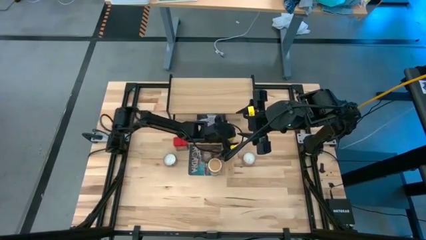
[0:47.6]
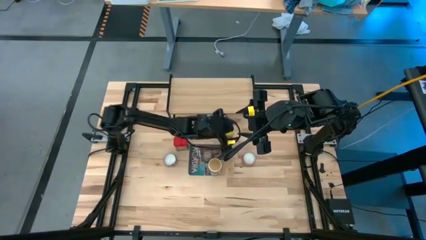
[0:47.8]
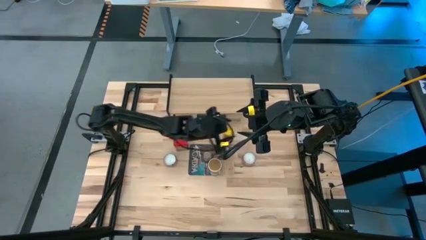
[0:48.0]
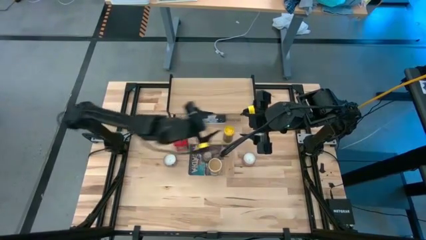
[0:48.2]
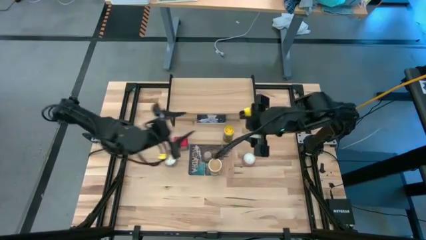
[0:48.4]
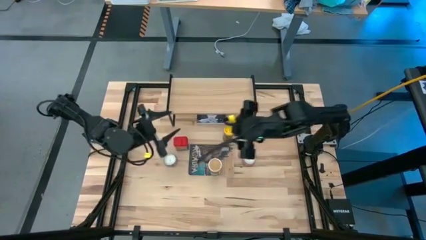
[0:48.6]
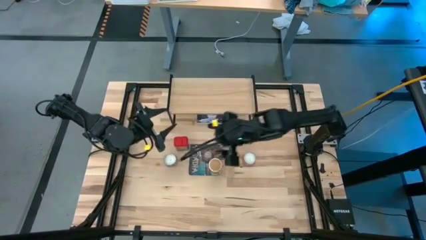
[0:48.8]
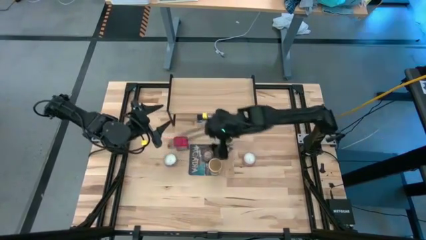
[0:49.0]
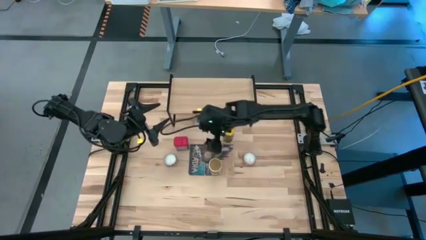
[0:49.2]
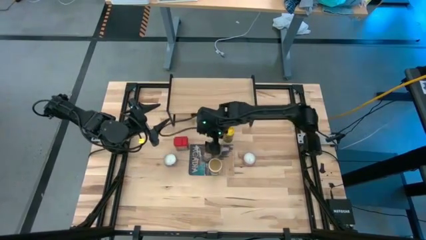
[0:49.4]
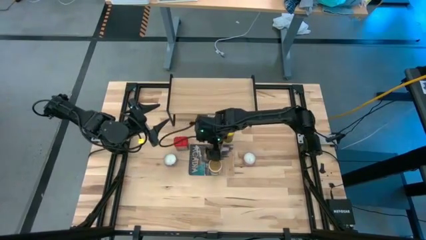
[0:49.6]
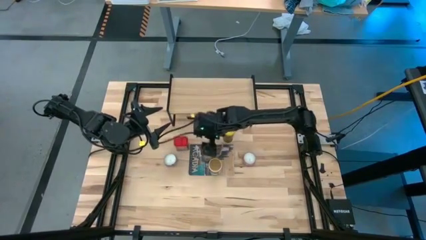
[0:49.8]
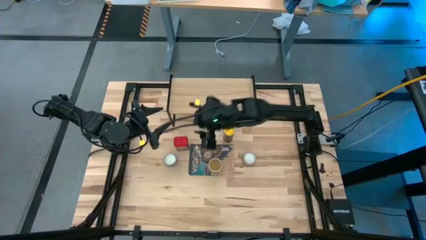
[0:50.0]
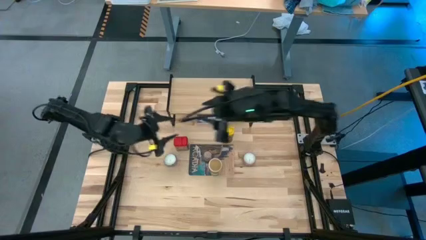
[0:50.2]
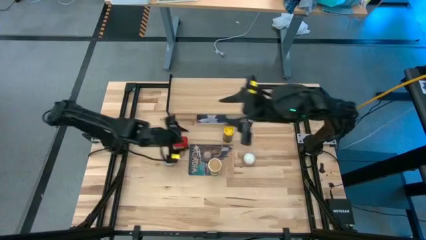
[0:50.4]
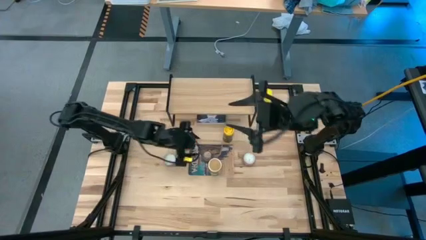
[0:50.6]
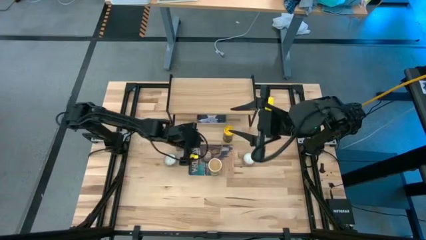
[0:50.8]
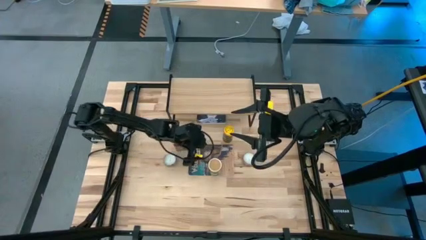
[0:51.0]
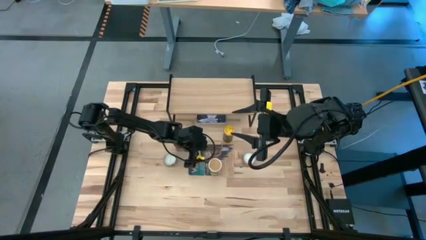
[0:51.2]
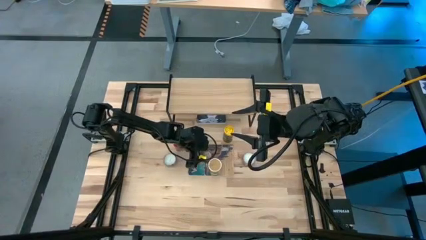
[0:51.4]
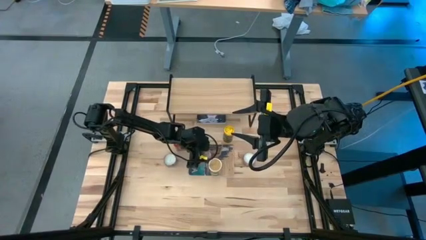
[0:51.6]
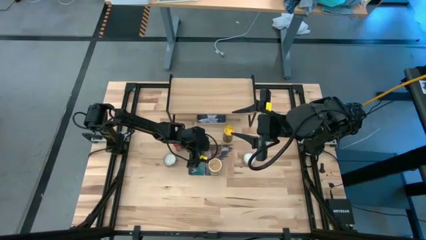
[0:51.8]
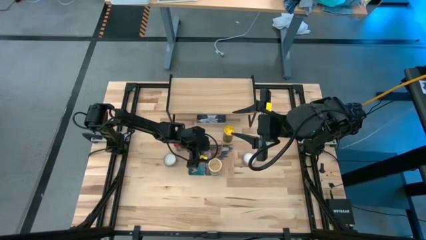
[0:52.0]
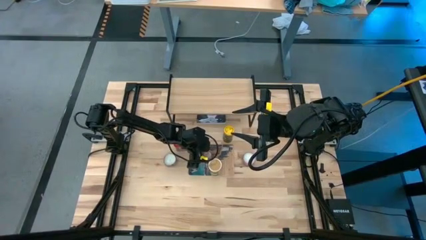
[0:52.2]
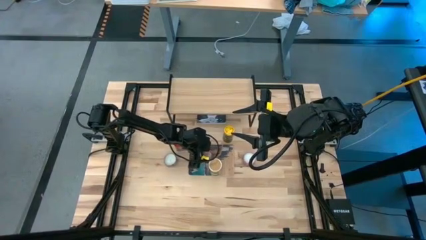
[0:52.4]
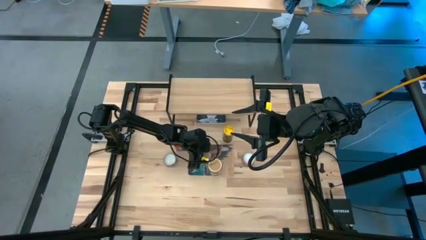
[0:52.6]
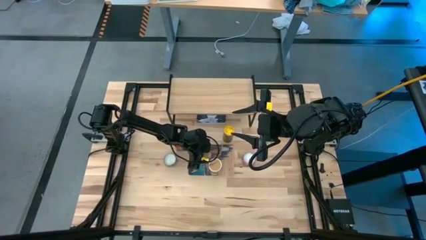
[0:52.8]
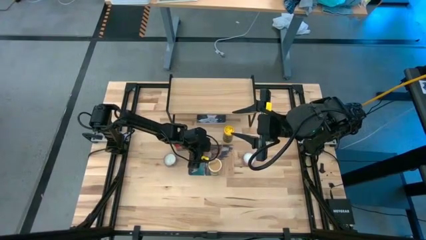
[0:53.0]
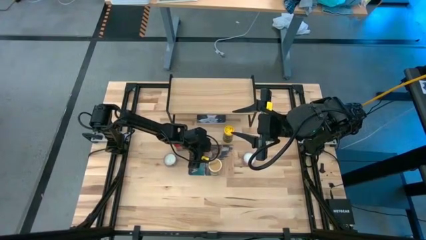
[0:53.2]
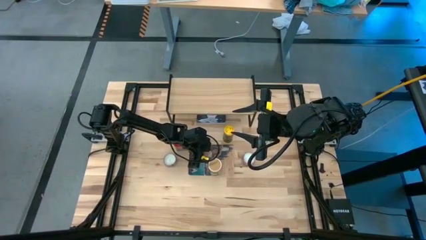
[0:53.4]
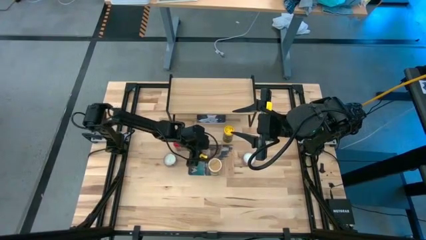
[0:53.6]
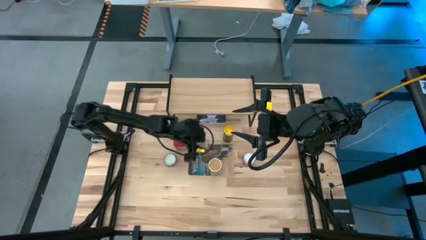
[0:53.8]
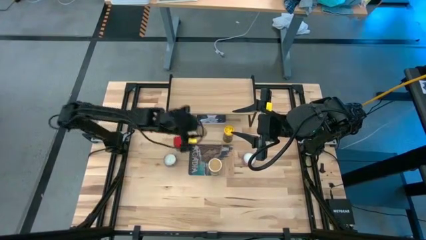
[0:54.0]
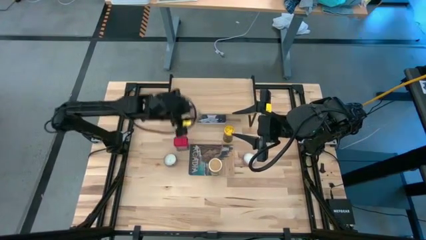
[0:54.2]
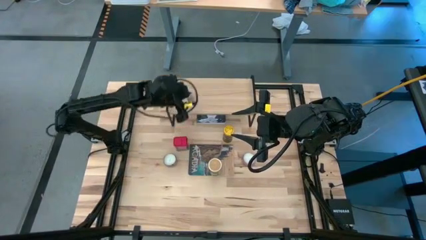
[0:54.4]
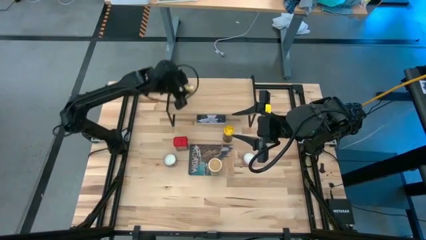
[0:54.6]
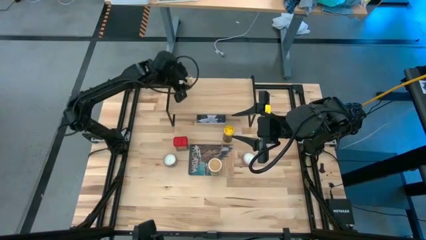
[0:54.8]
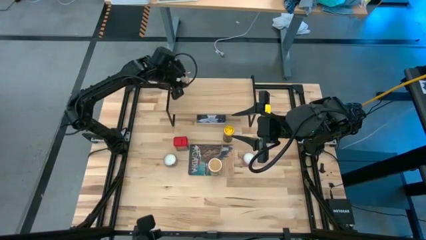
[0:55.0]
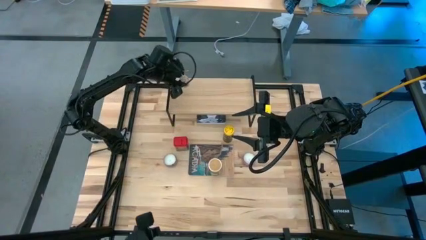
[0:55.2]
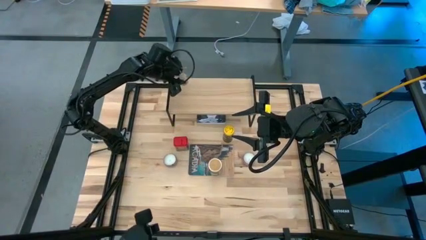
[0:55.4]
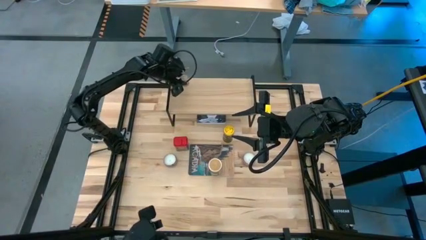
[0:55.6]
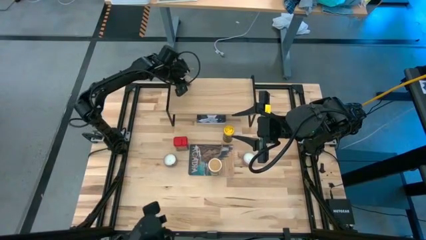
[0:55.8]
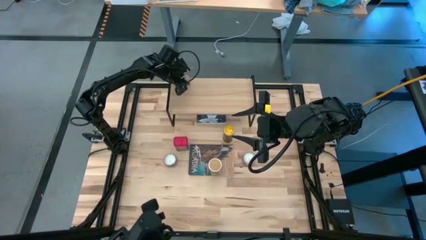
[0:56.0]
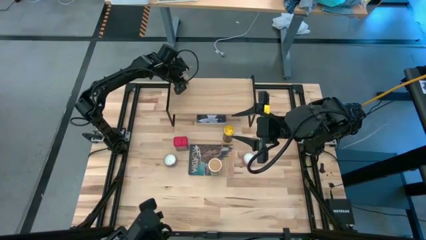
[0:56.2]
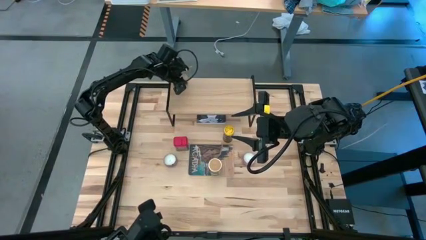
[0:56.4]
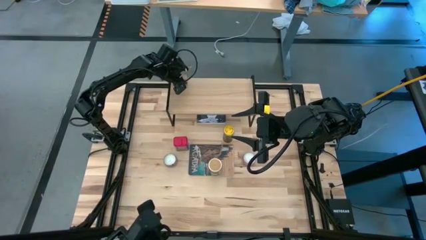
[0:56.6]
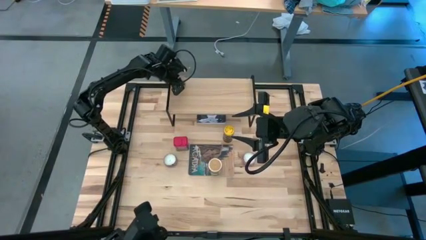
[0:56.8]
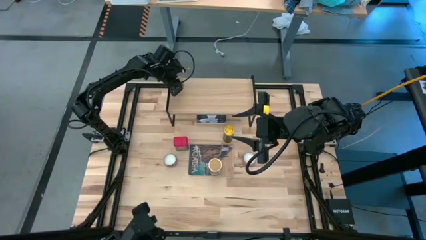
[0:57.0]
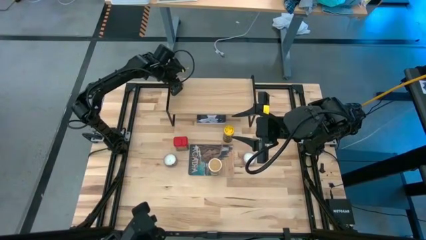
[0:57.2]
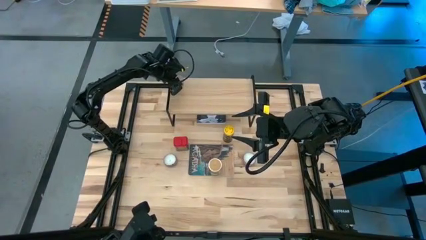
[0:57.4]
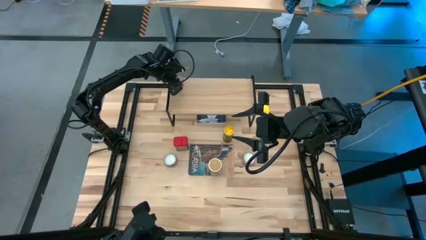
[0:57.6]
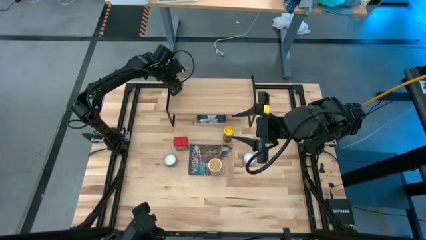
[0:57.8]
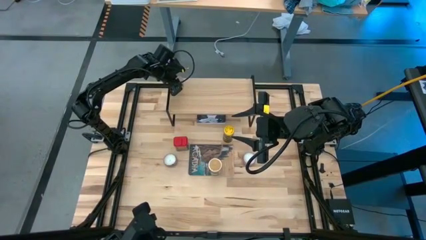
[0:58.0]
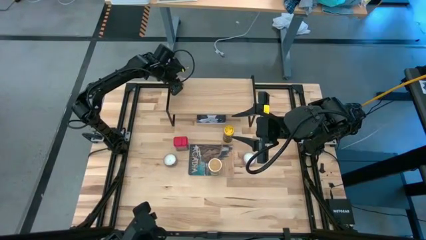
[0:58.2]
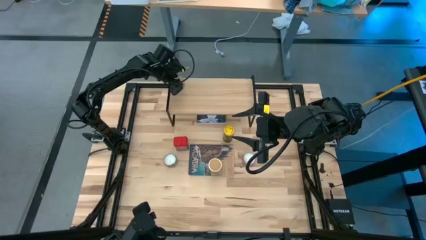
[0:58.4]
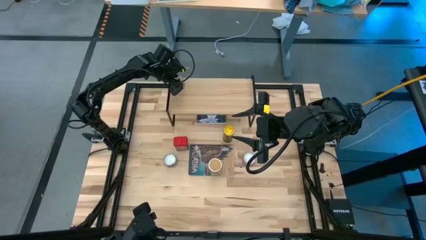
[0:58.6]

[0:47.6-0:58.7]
Task: Shelf spices
Put the transparent seasoning bottle on the shelf
